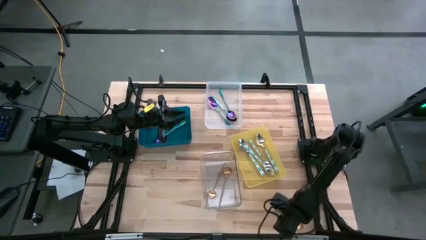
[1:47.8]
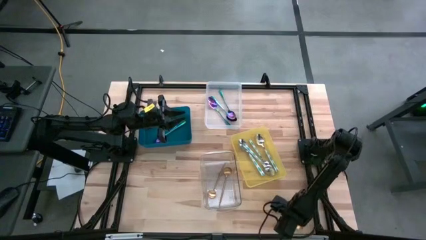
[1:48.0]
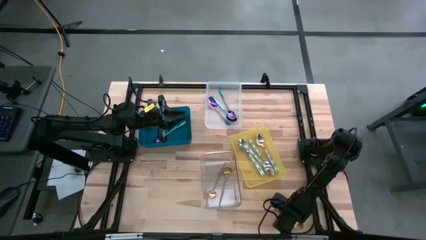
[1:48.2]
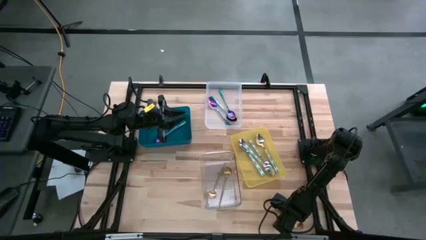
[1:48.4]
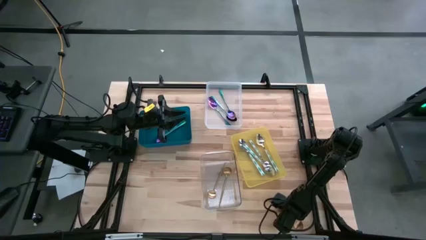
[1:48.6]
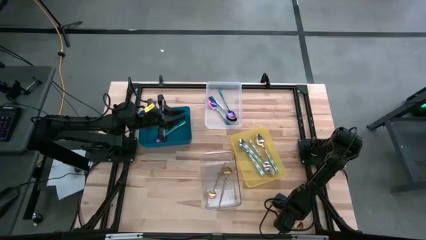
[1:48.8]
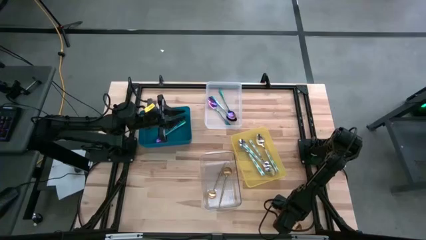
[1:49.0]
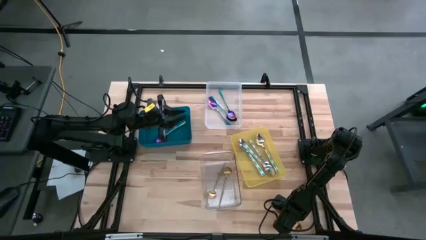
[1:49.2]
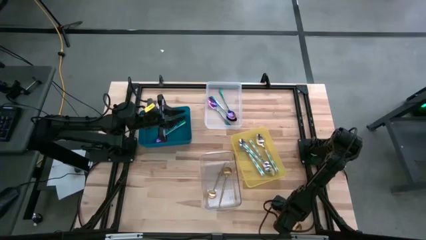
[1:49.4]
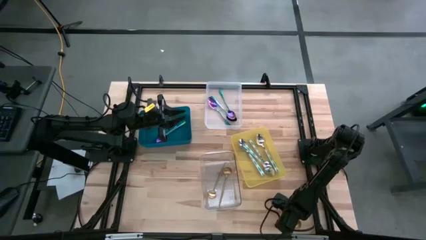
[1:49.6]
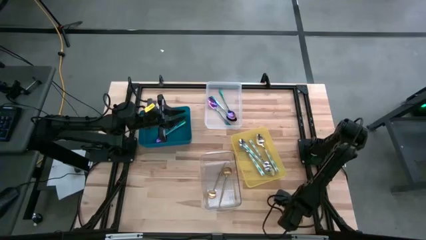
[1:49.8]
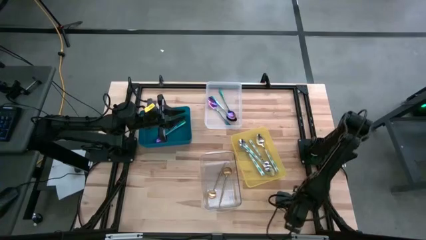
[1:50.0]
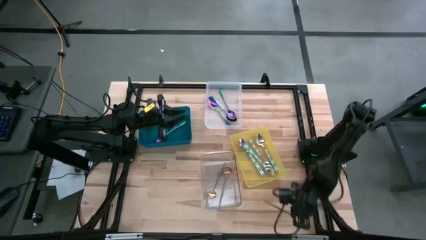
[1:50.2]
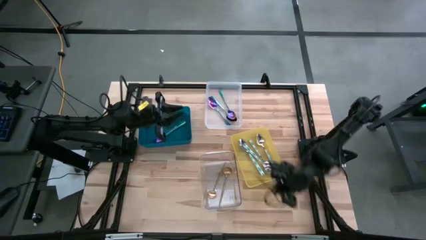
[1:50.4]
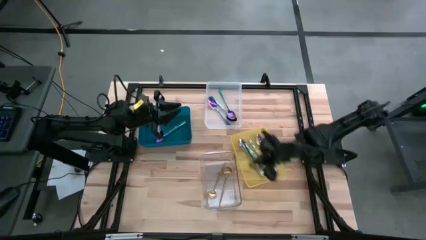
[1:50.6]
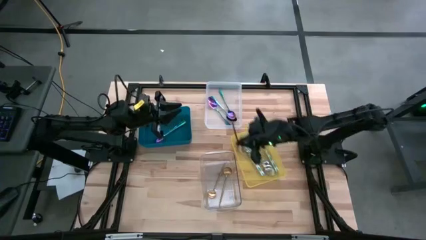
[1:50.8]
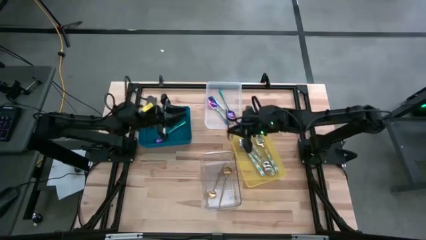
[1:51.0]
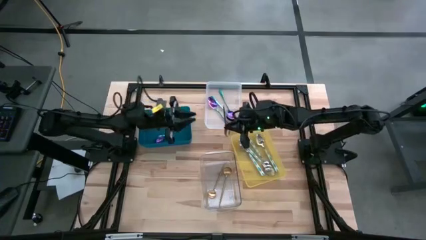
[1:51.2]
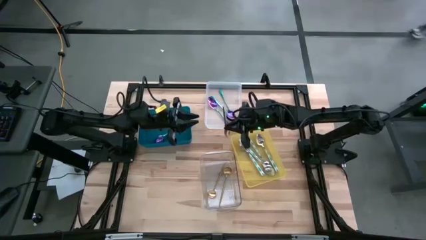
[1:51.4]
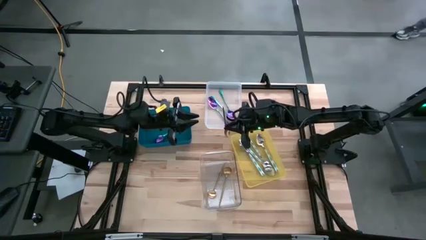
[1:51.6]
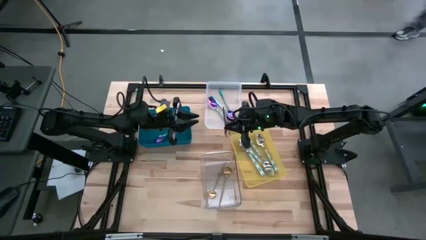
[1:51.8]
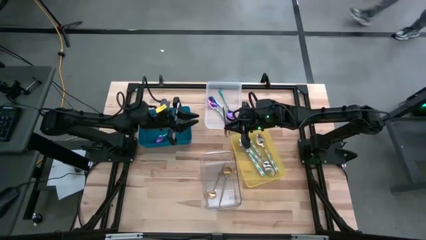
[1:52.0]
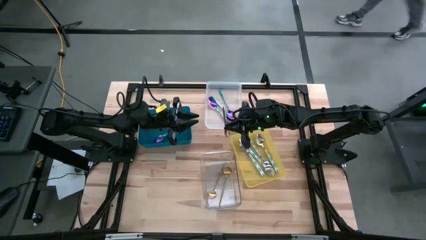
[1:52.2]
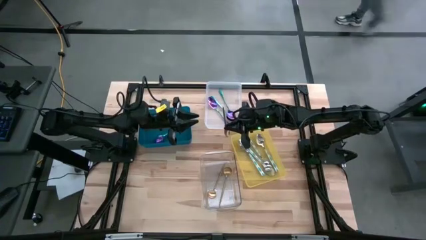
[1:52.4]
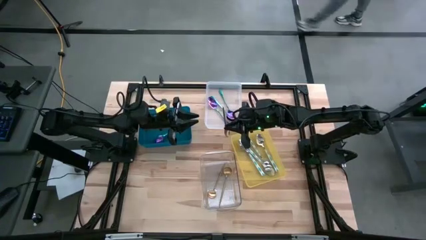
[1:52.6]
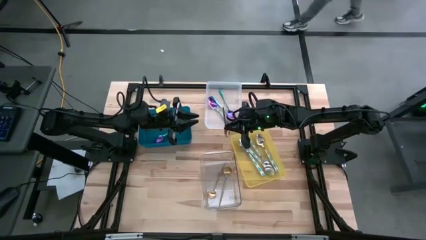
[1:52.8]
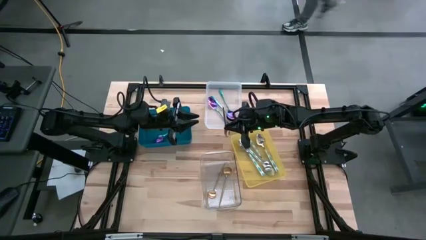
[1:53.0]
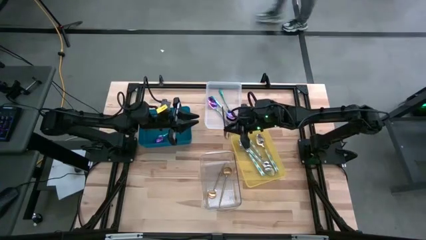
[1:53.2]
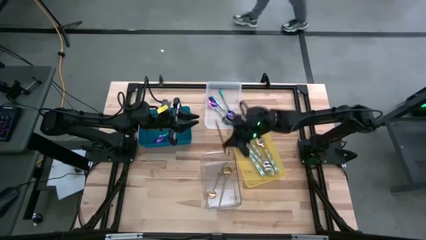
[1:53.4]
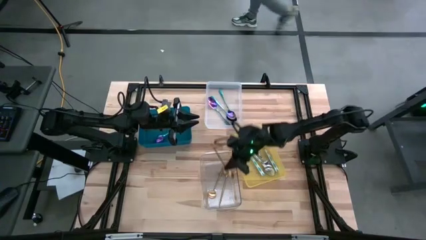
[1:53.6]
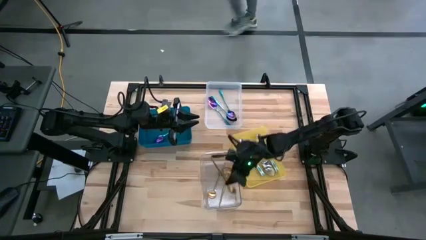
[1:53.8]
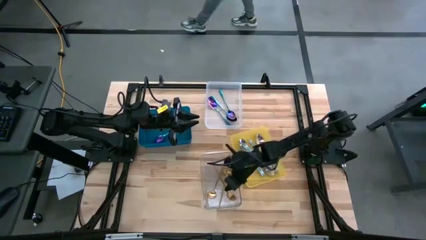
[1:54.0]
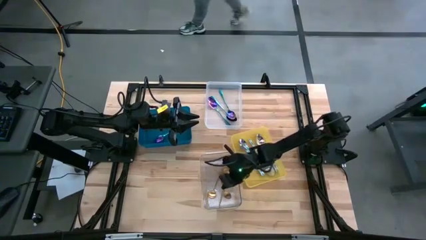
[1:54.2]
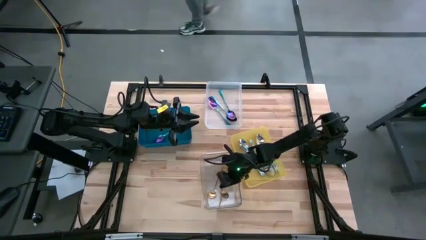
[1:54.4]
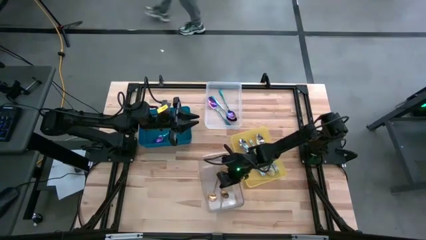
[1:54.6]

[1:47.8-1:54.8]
Task: Sort silverware by color (type)
Put the gold spoon into the transparent bin

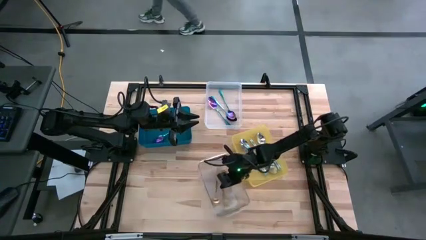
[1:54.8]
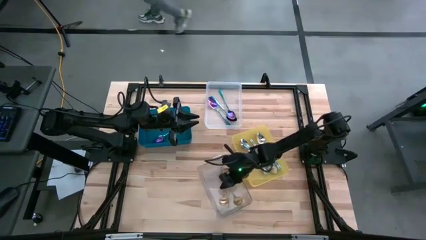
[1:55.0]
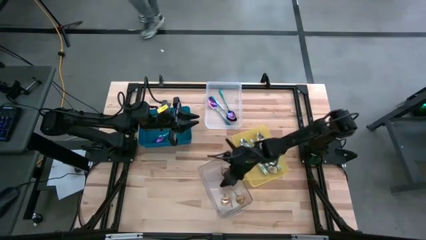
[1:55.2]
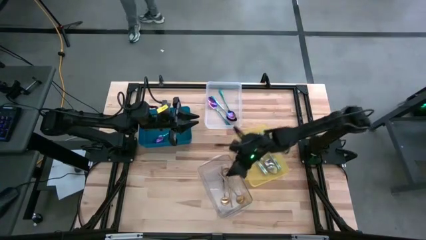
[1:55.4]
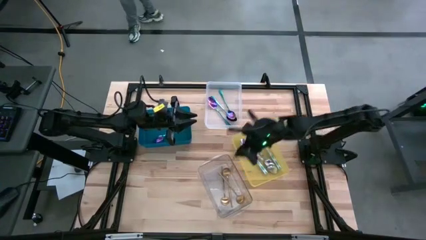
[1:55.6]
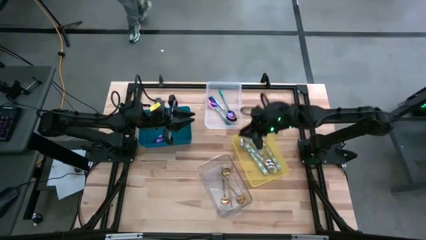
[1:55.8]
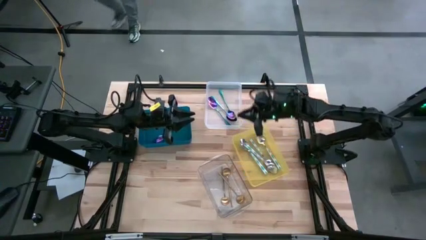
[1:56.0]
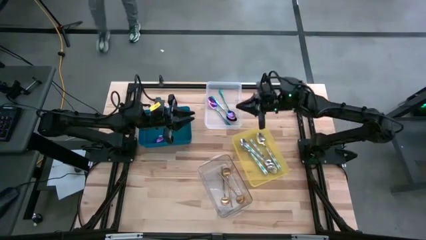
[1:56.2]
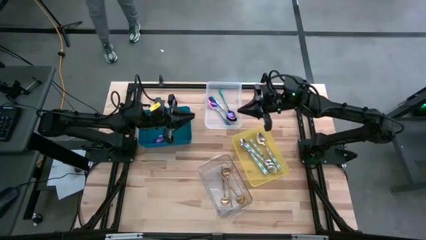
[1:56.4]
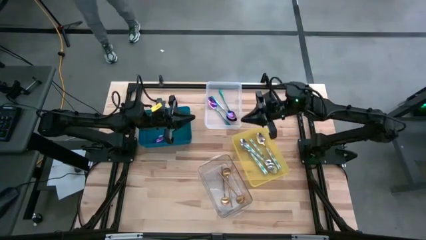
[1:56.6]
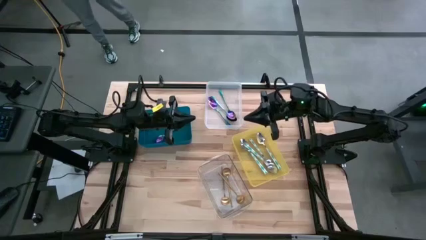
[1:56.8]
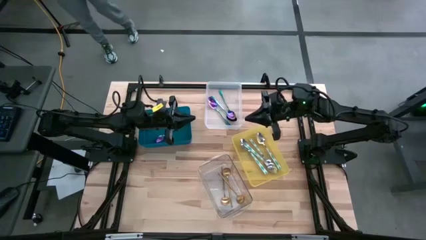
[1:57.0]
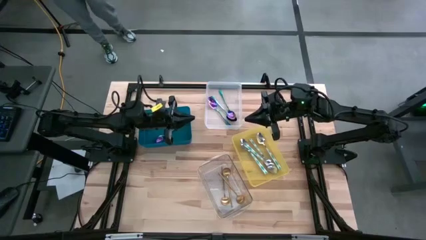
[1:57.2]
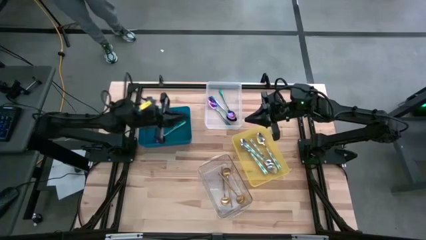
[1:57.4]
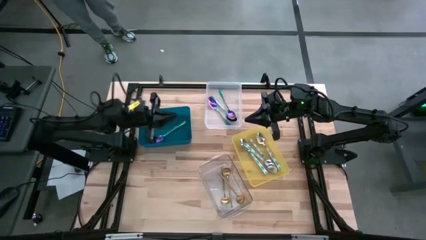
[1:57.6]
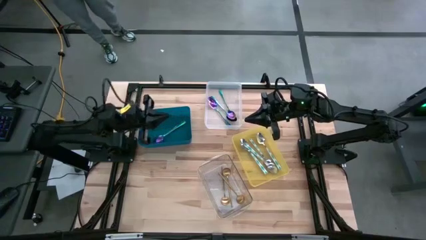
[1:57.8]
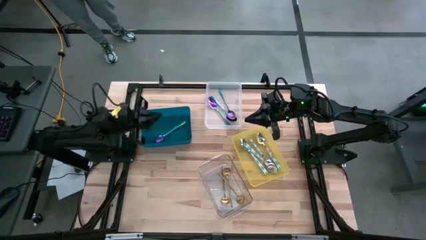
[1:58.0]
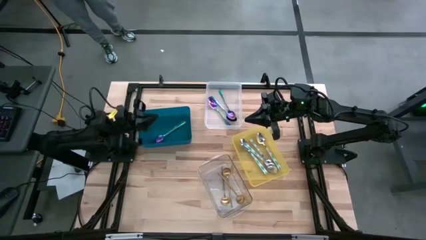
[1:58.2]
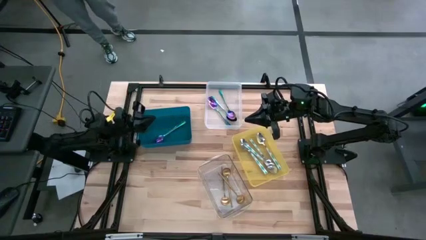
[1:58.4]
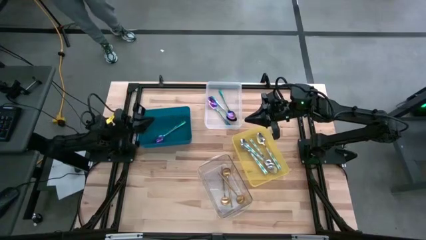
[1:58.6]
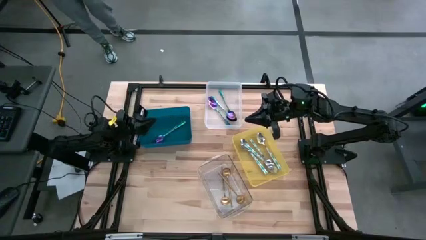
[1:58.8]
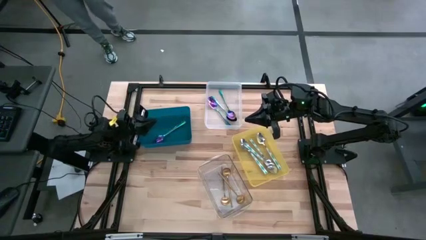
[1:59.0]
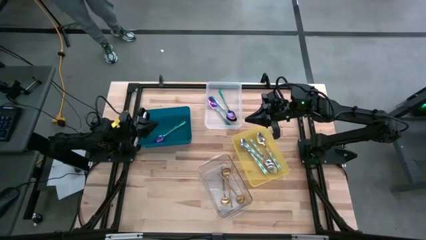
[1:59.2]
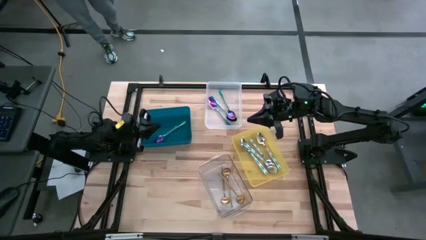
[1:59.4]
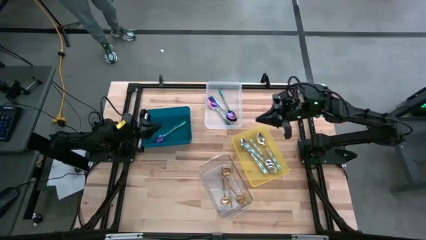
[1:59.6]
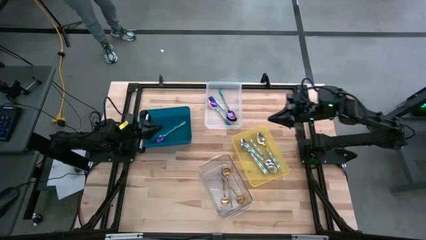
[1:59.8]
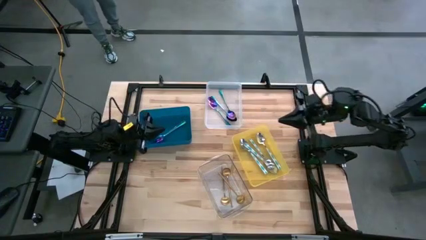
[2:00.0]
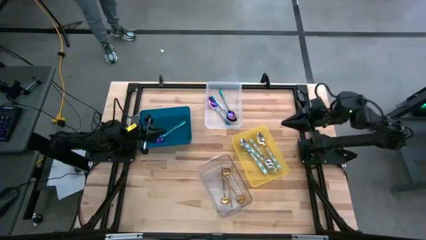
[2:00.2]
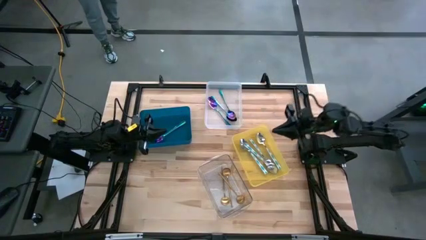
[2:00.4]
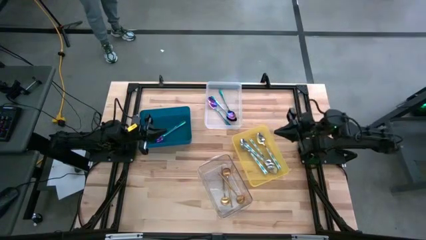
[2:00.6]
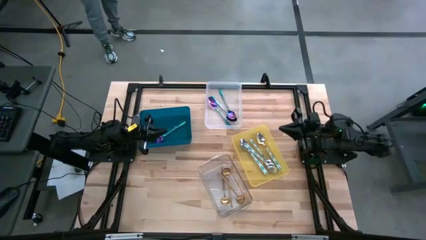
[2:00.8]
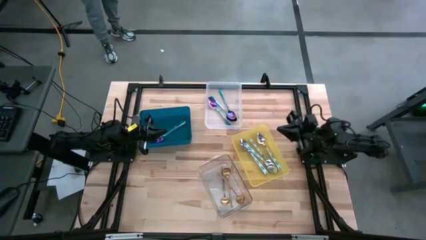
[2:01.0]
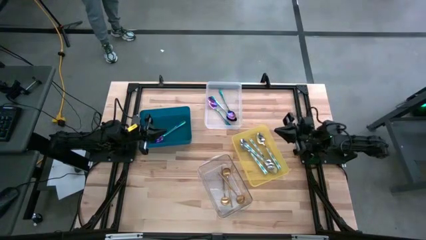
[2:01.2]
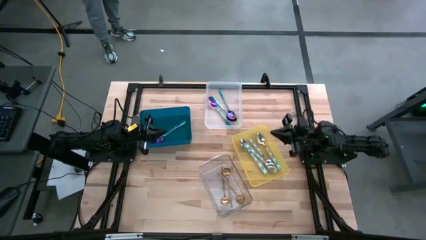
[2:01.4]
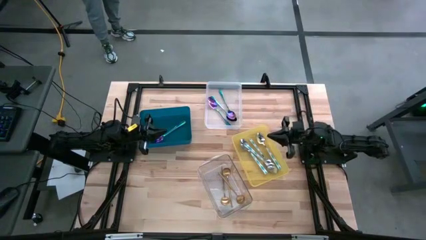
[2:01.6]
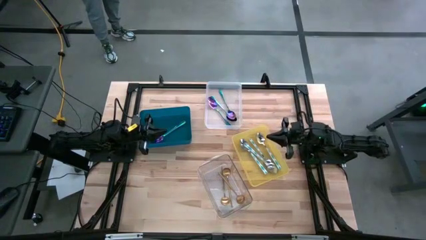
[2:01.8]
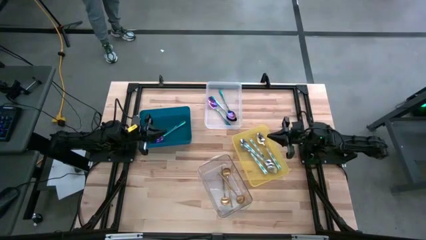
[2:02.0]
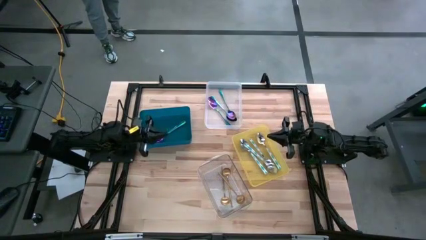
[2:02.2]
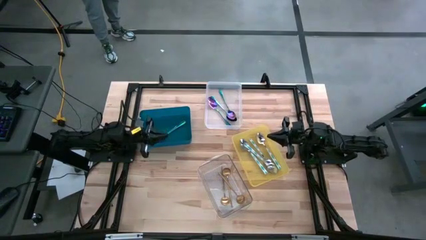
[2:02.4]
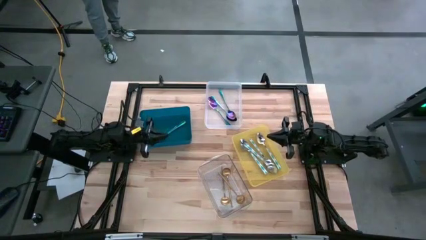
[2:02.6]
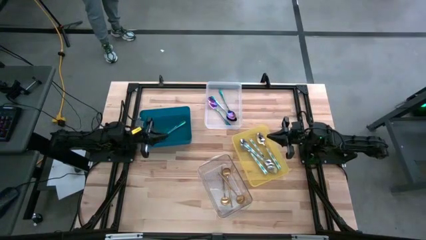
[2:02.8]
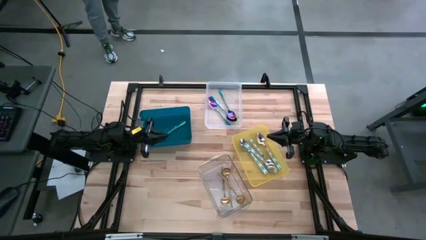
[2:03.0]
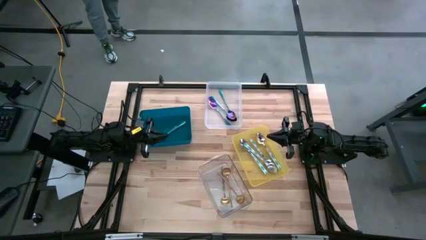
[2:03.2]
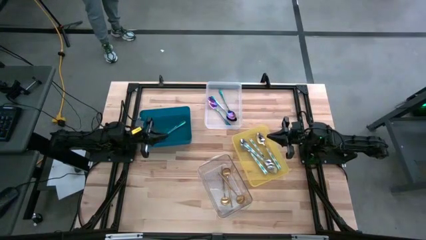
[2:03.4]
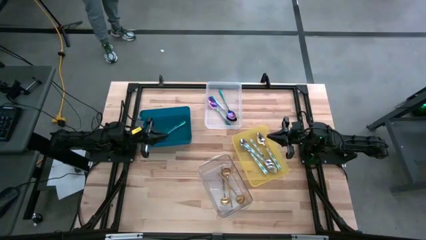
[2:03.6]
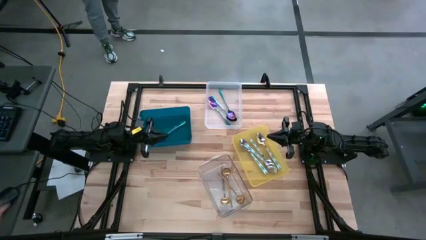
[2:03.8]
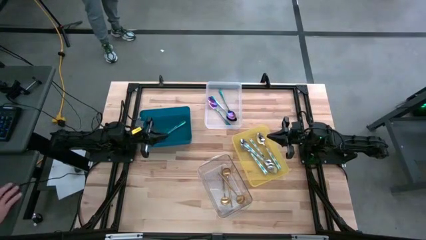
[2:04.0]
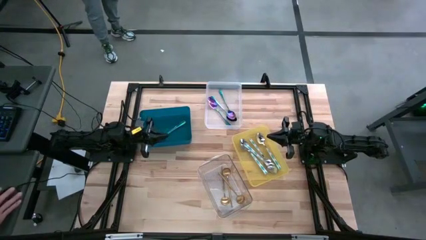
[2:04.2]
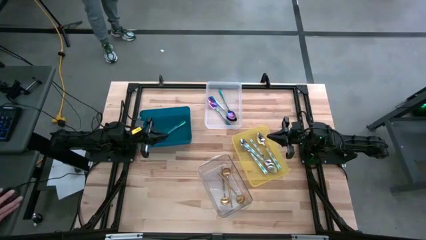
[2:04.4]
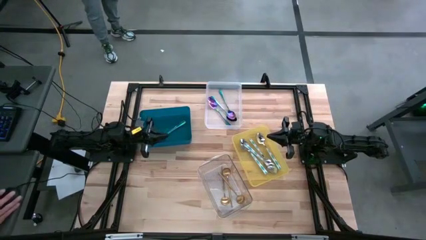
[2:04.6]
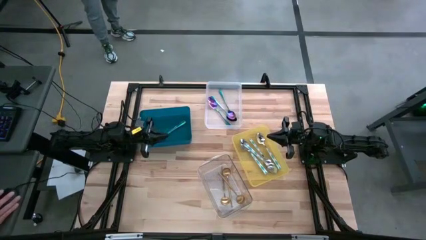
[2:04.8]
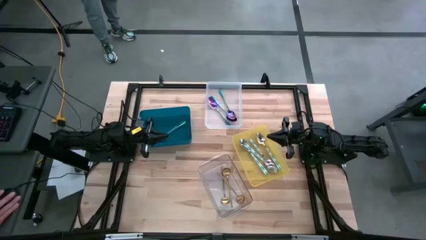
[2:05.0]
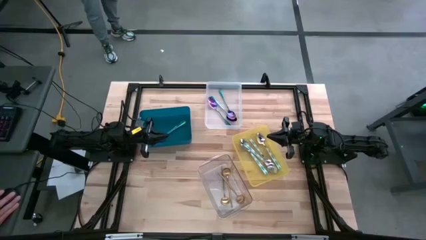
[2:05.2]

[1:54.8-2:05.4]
Return to Home Position
